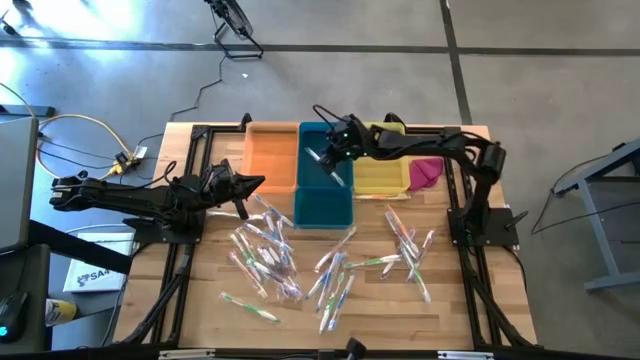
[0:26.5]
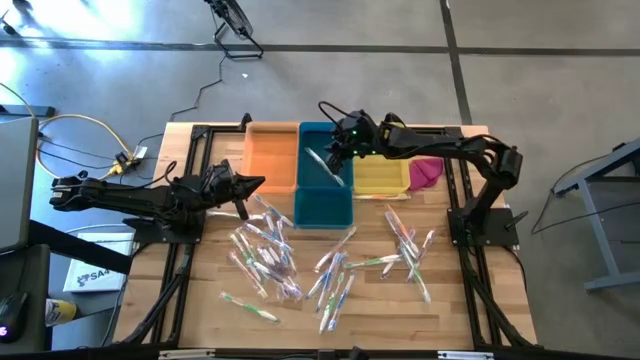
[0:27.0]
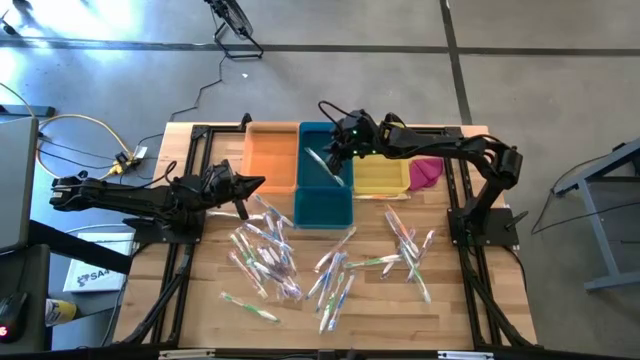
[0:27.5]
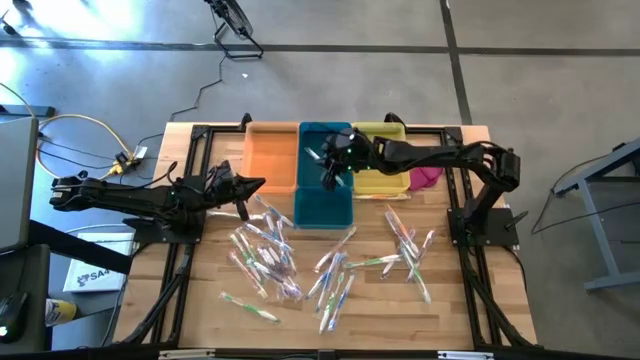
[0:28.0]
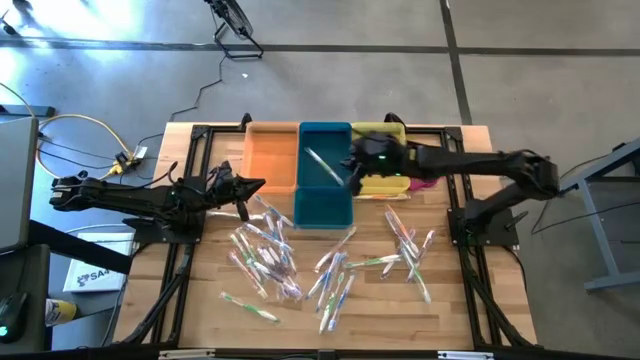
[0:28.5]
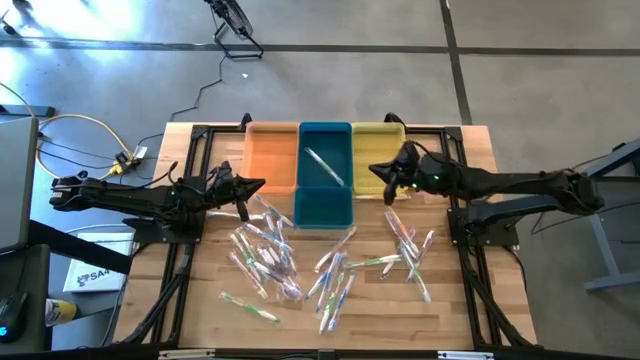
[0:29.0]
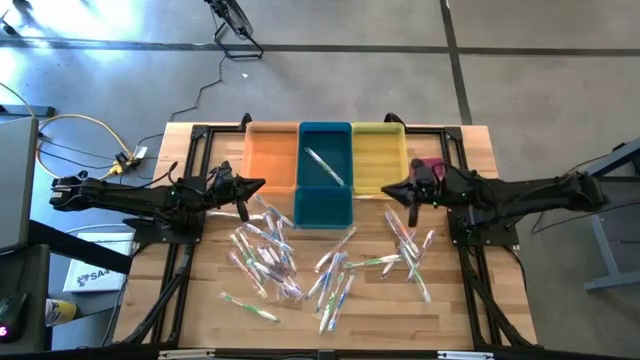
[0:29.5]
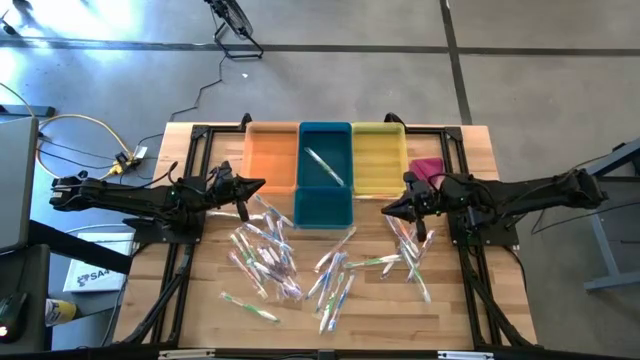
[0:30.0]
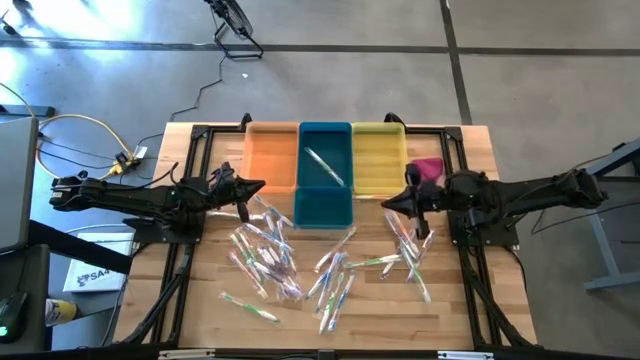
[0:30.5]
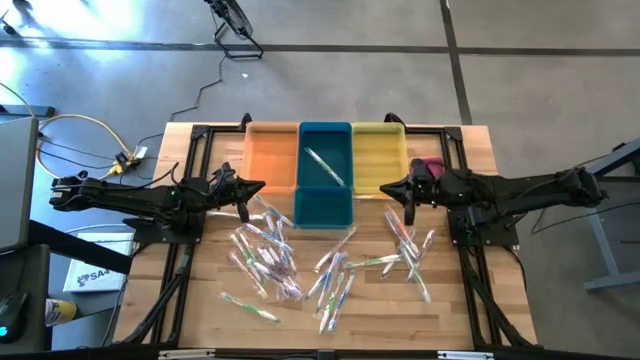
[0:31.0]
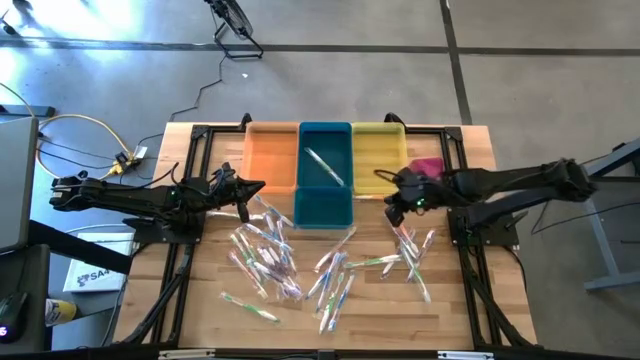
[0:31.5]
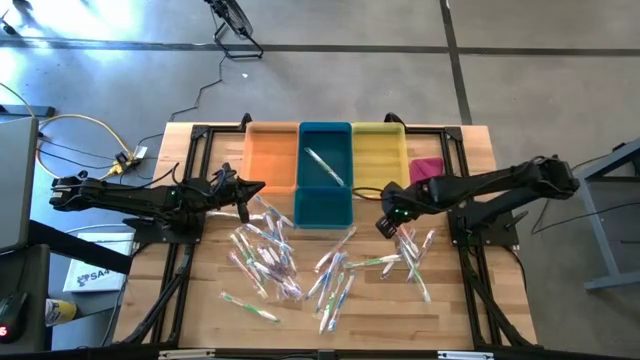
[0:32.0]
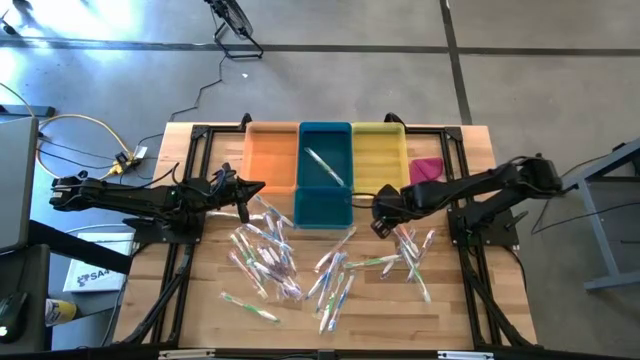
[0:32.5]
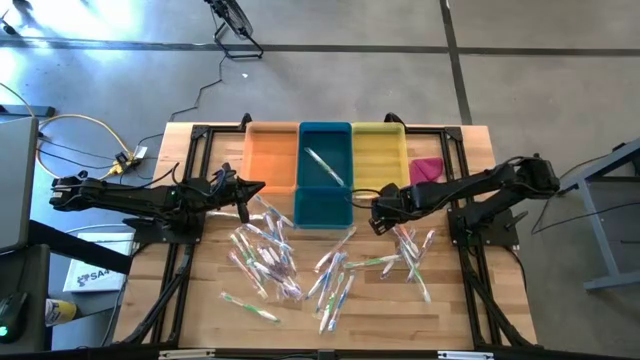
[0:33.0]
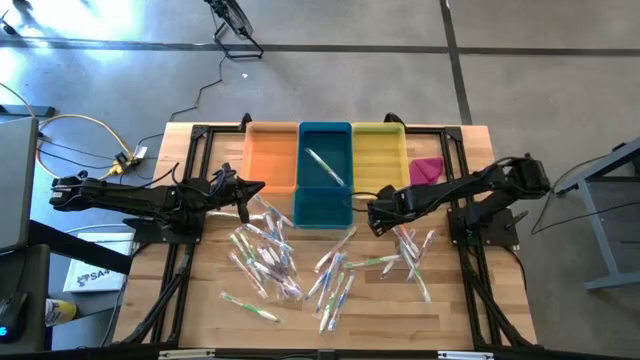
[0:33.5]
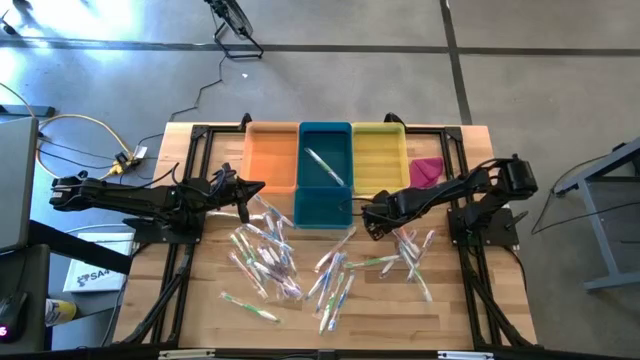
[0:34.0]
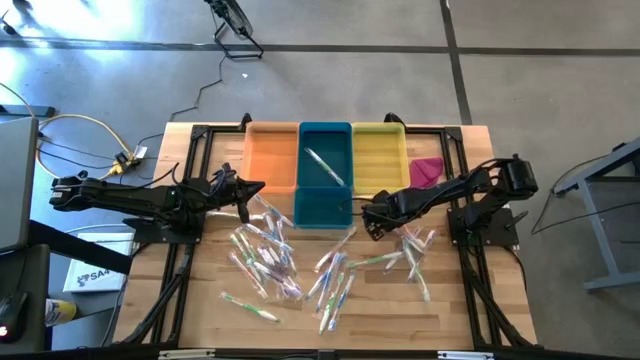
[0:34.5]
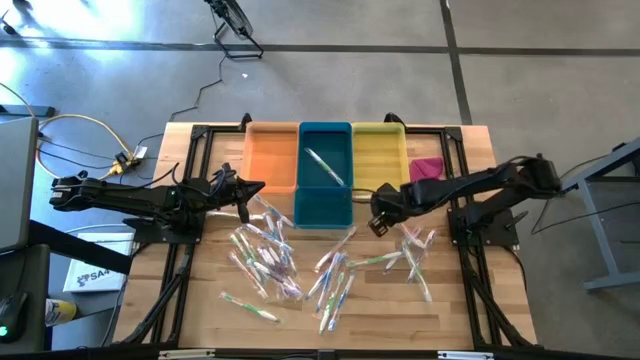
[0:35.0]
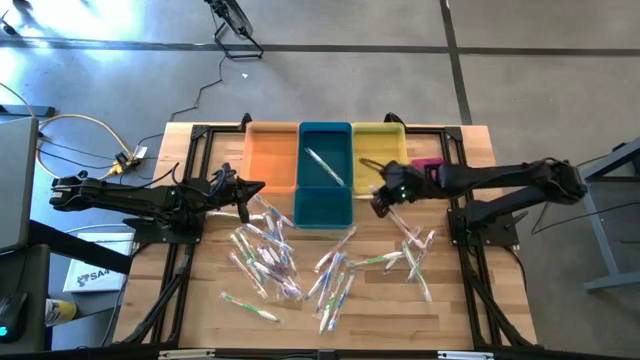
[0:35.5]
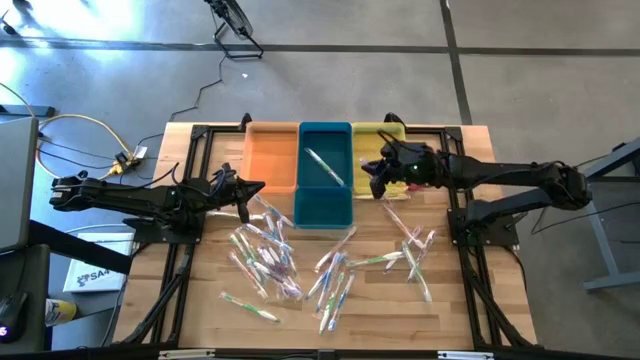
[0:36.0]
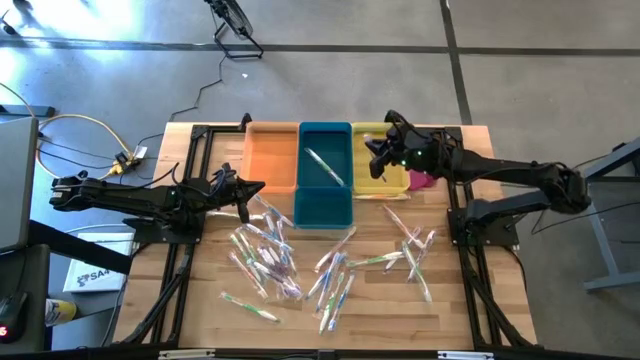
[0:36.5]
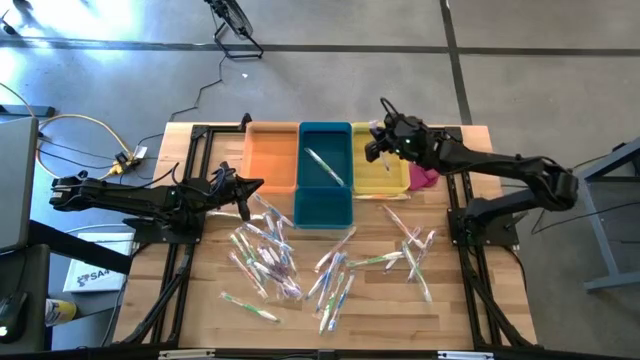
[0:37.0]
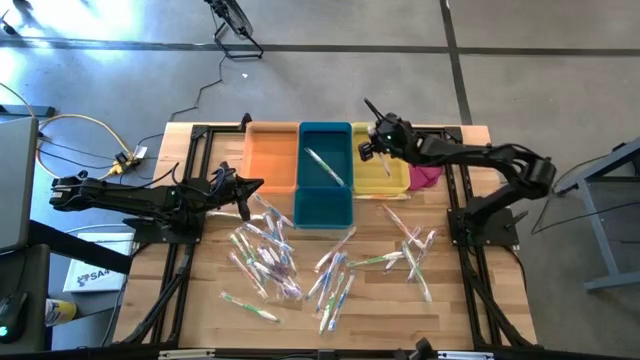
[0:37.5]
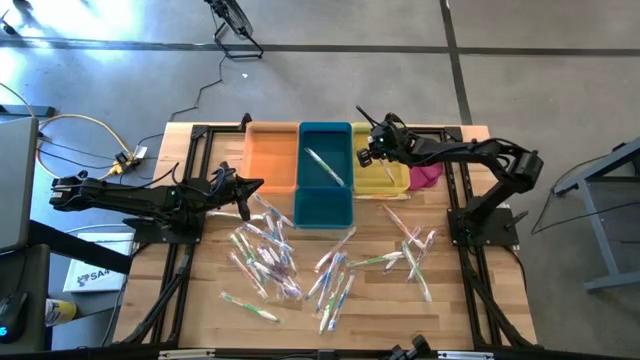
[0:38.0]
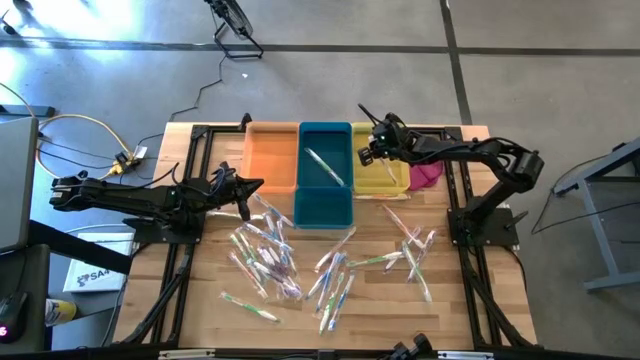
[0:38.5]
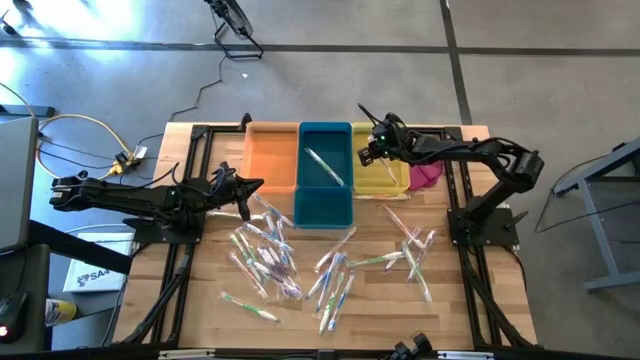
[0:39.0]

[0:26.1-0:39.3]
Task: Pick & Place Toothbrushes
Put the violet toothbrush into the yellow bin

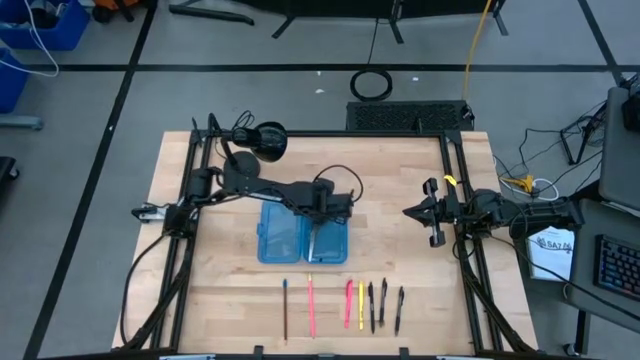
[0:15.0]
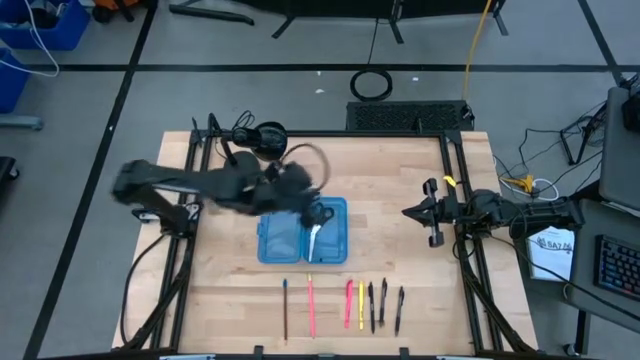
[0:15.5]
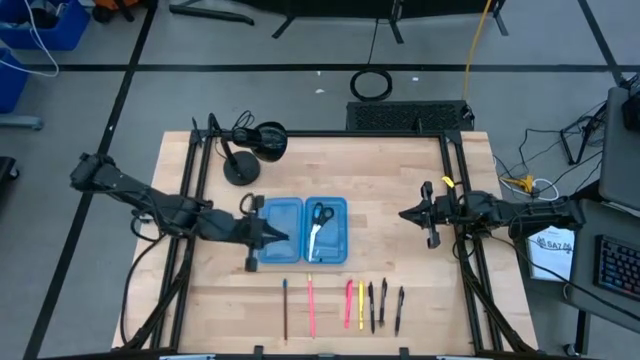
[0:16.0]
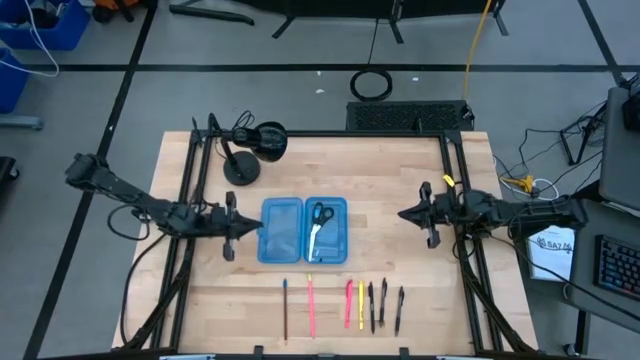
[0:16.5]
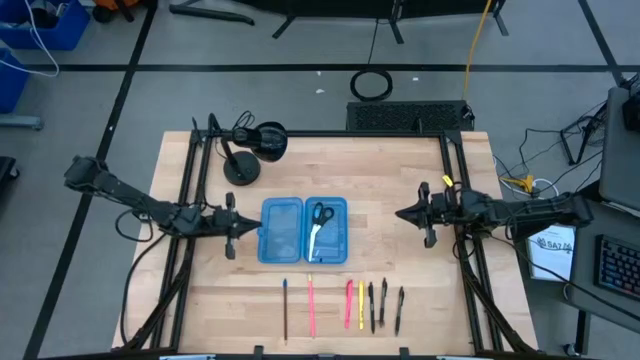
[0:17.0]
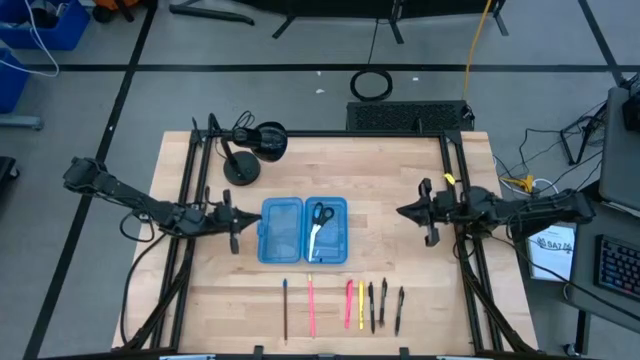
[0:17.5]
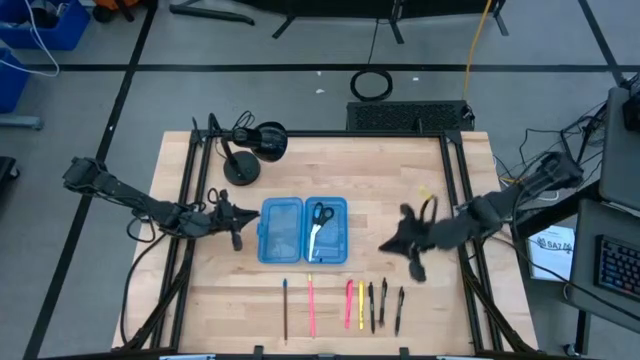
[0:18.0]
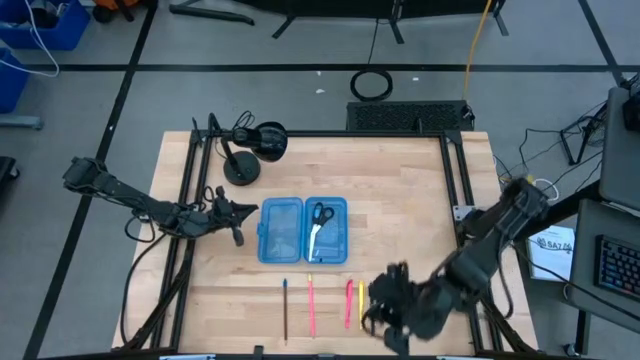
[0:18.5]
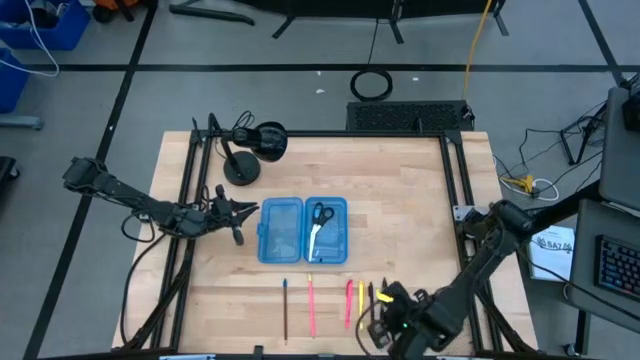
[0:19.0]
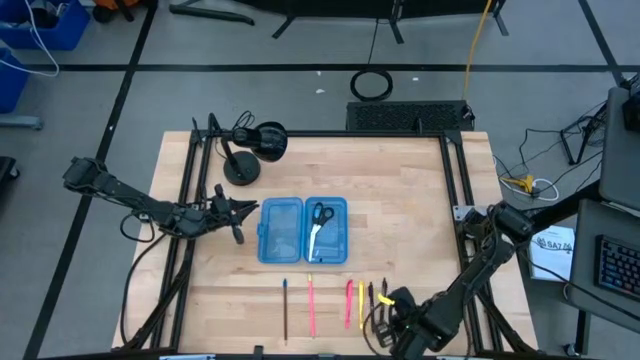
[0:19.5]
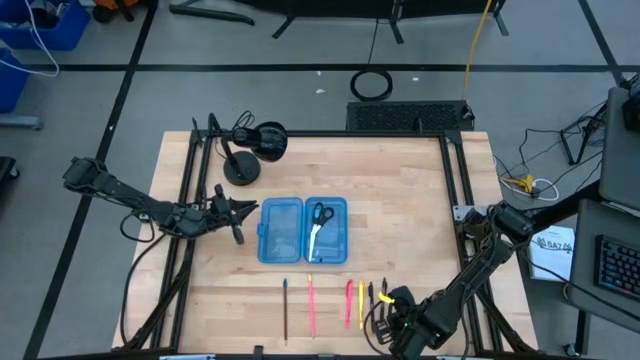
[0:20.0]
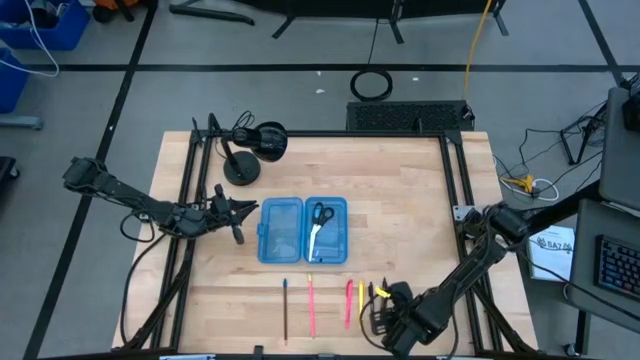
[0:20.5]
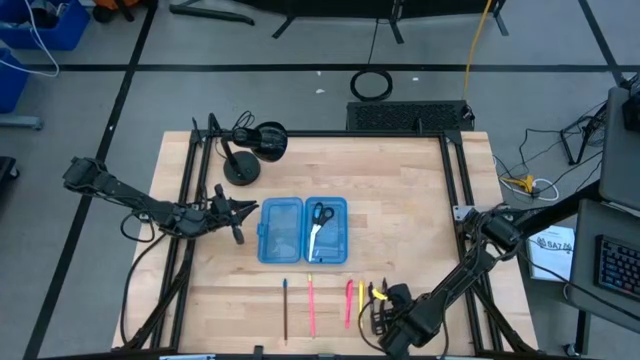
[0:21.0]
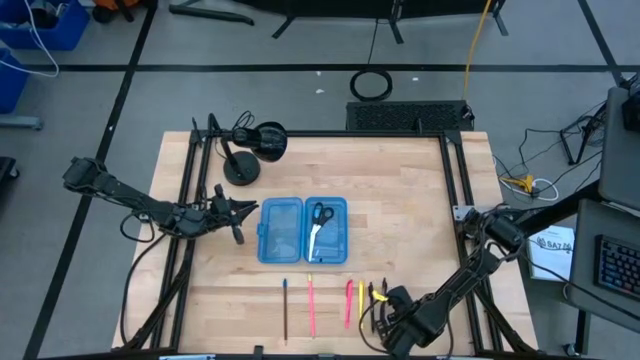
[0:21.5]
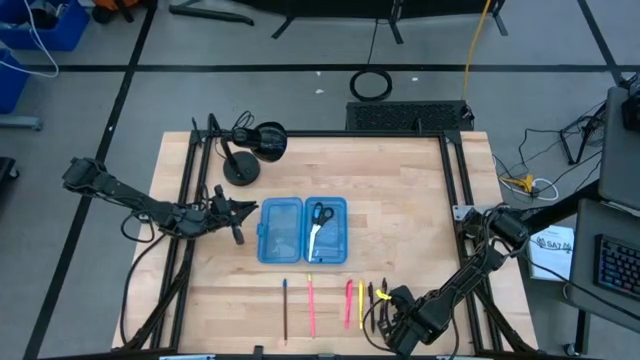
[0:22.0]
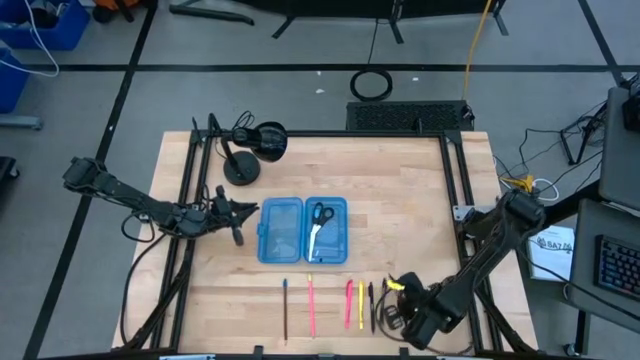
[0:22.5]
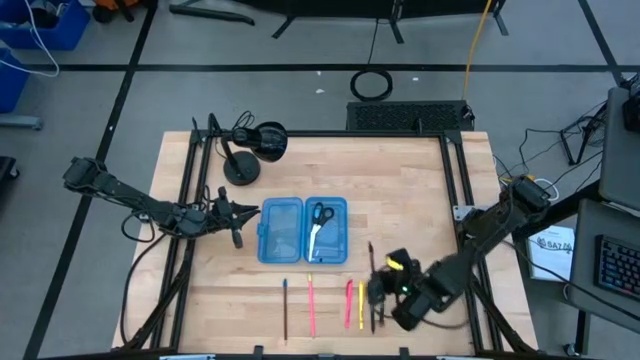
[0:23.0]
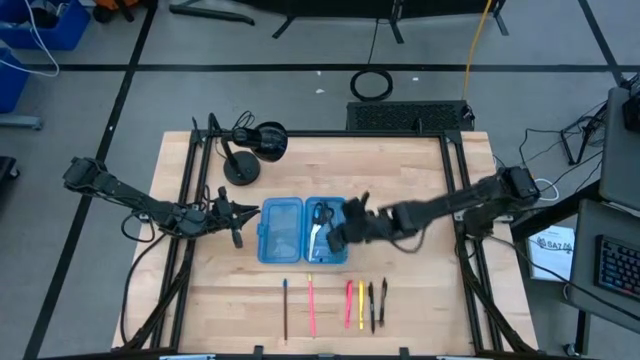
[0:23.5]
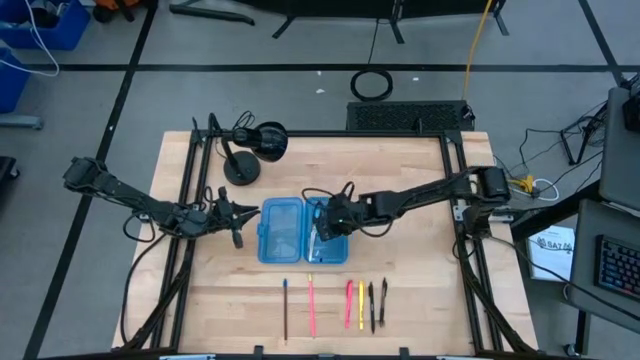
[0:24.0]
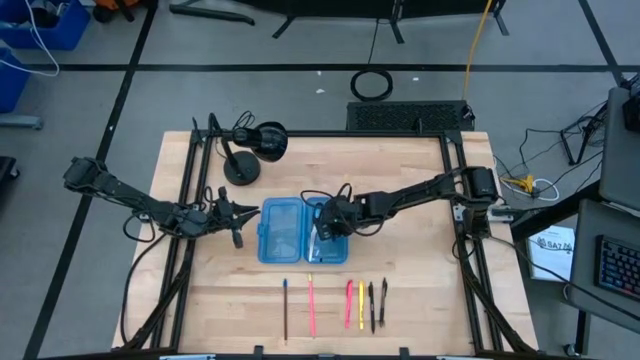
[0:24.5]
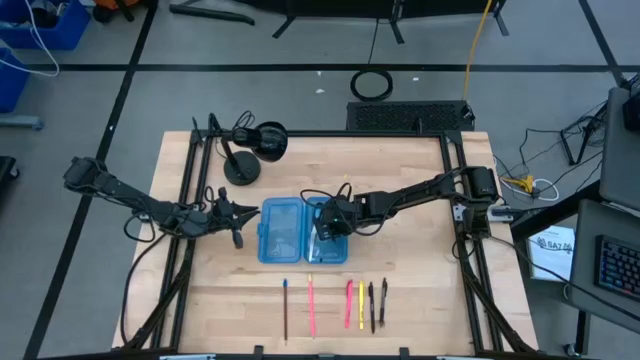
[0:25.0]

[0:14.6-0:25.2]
Task: Pick & place school supplies into a supply box
Put the black pen into the blue box
